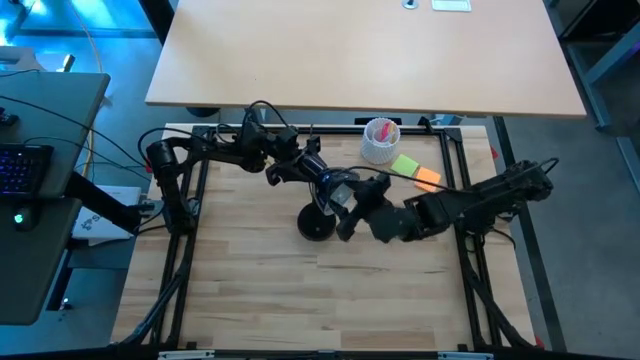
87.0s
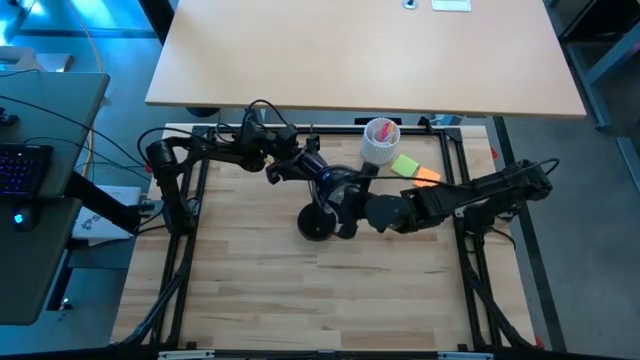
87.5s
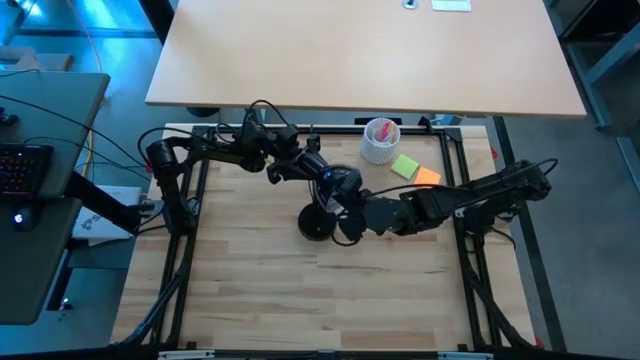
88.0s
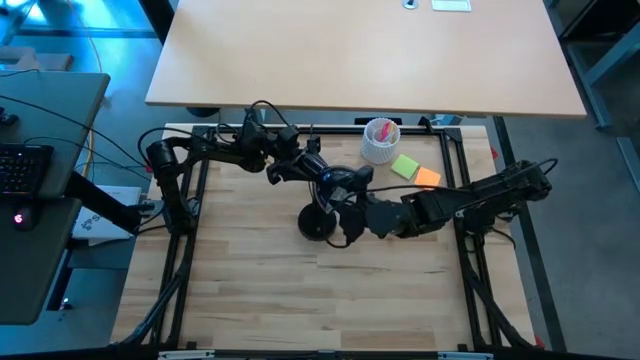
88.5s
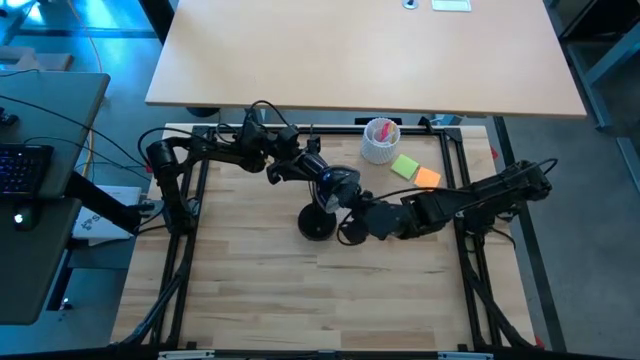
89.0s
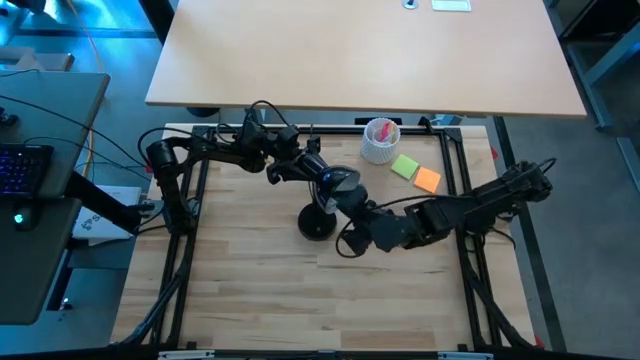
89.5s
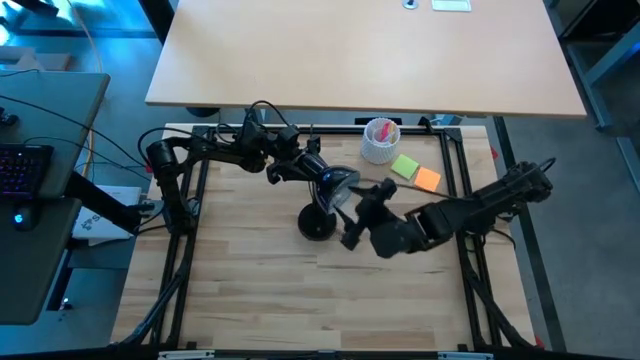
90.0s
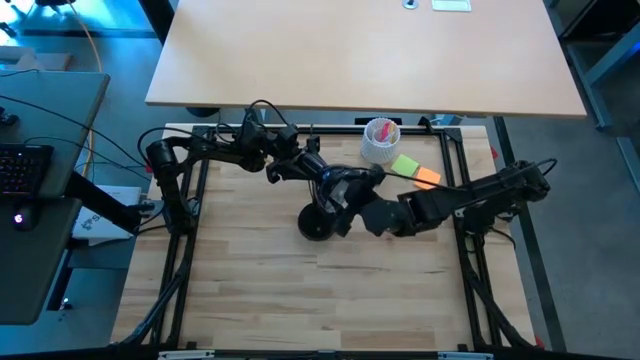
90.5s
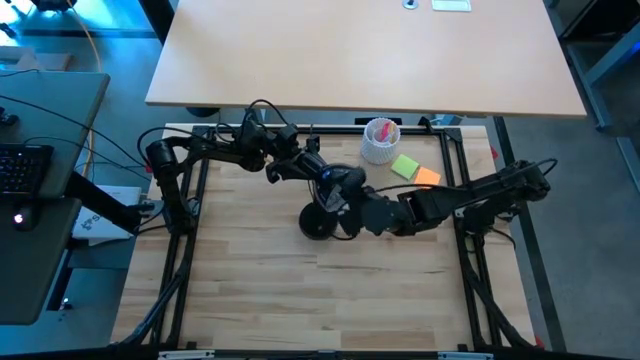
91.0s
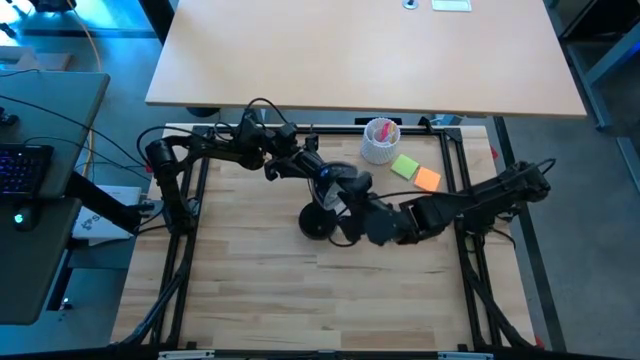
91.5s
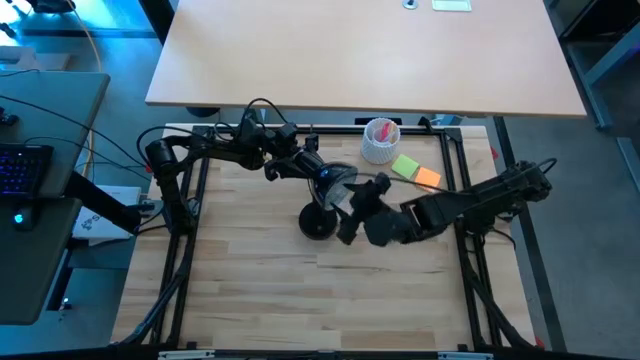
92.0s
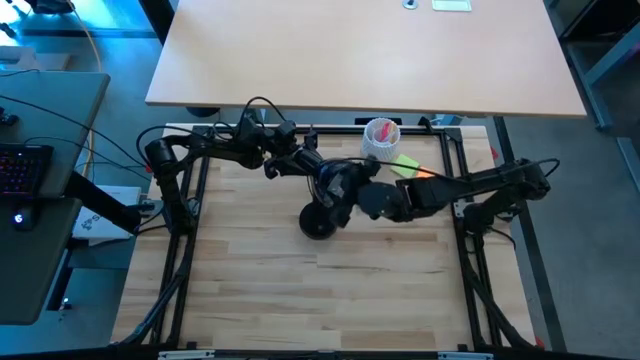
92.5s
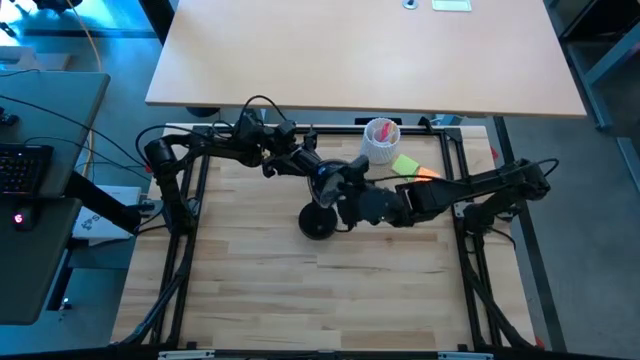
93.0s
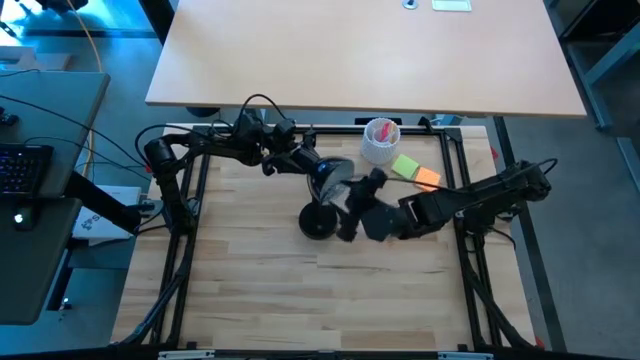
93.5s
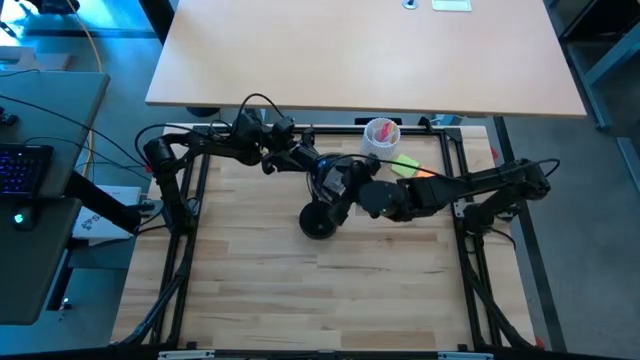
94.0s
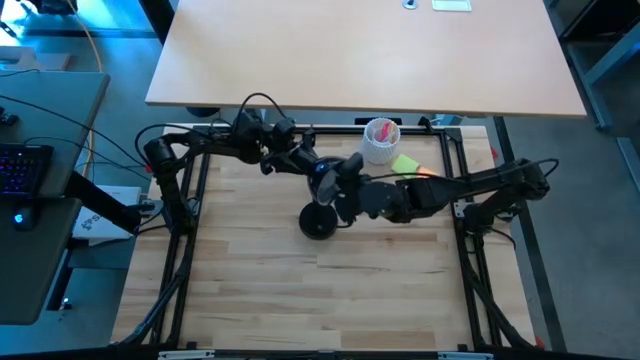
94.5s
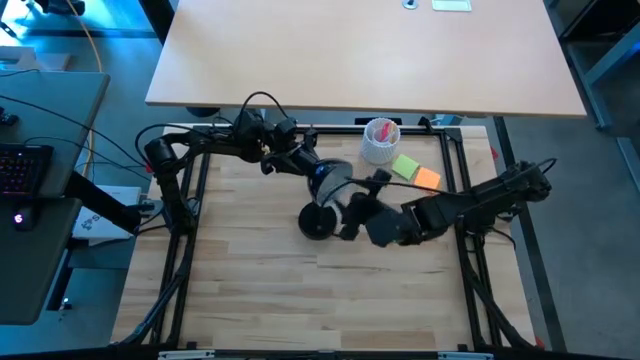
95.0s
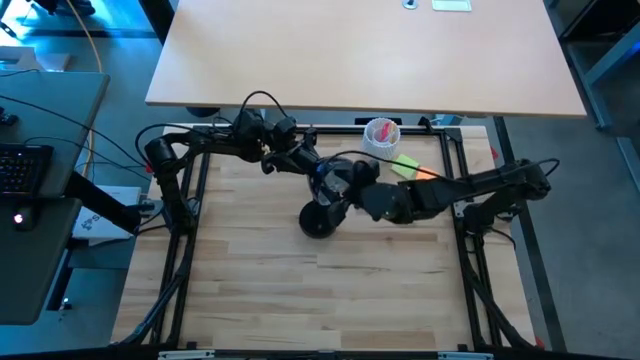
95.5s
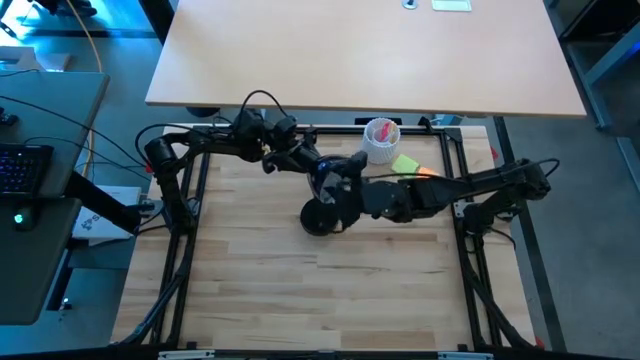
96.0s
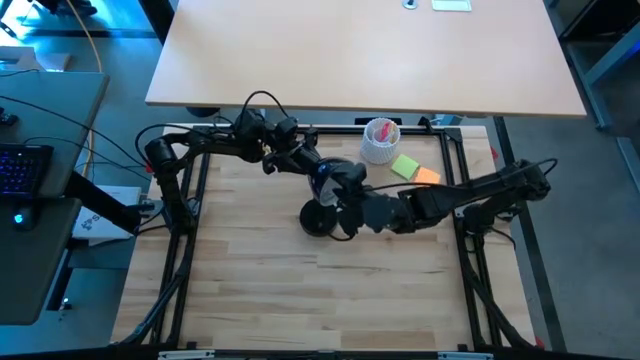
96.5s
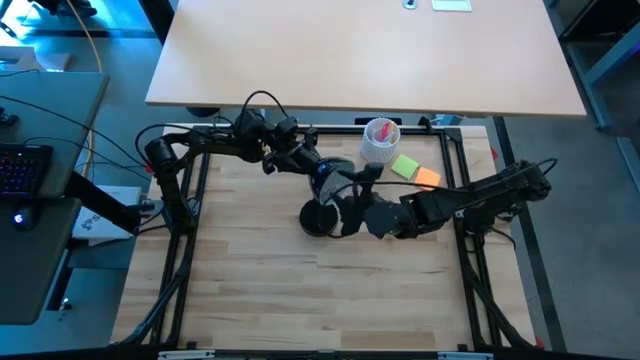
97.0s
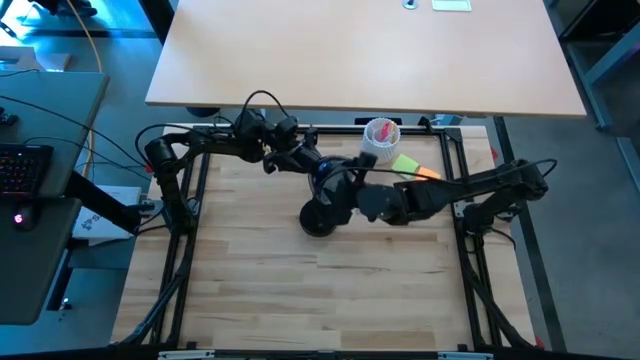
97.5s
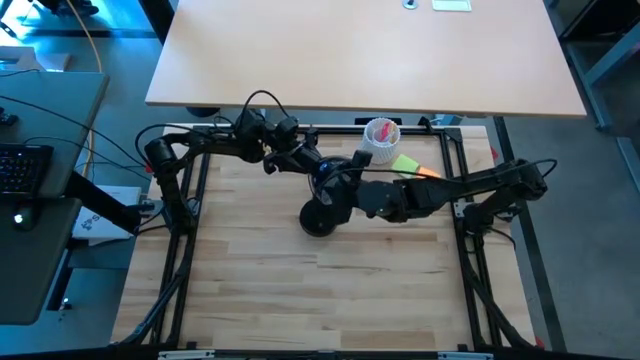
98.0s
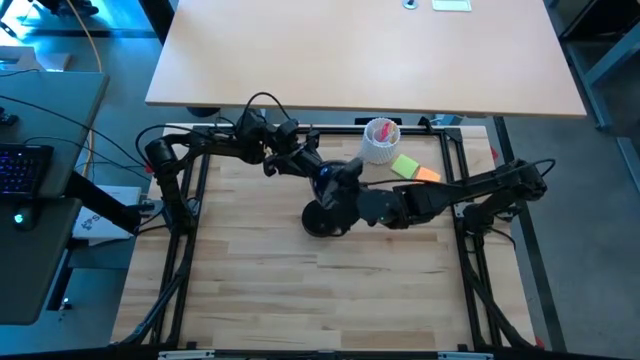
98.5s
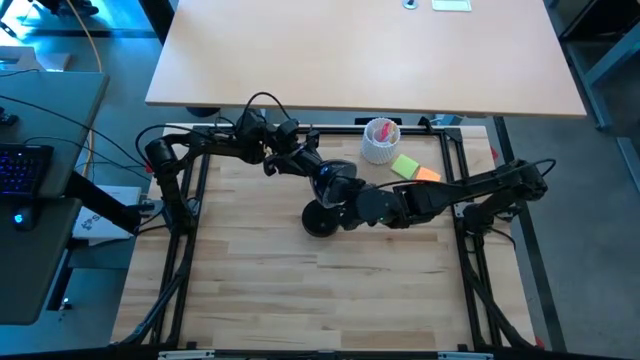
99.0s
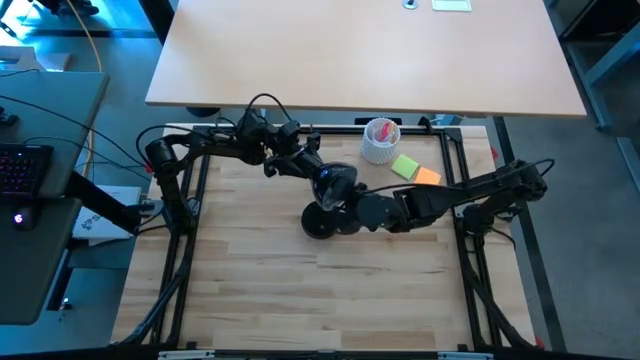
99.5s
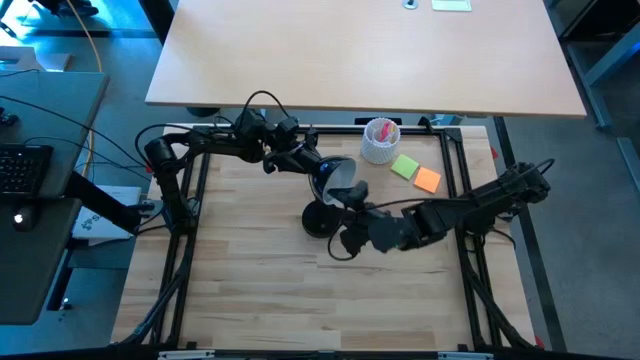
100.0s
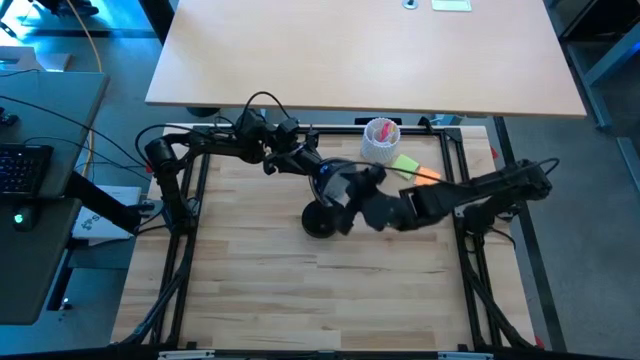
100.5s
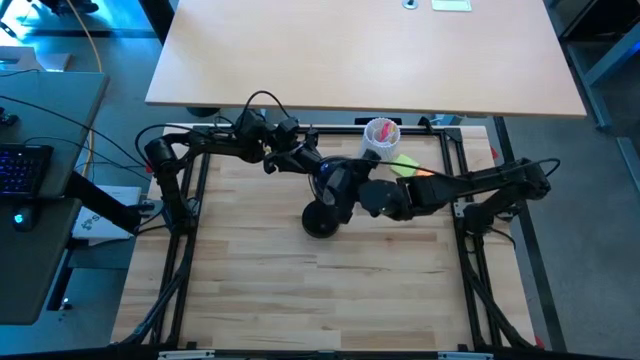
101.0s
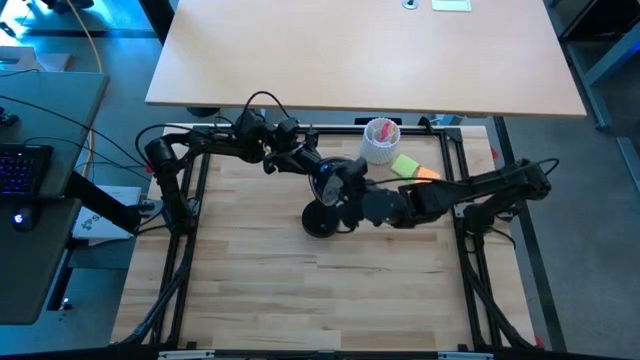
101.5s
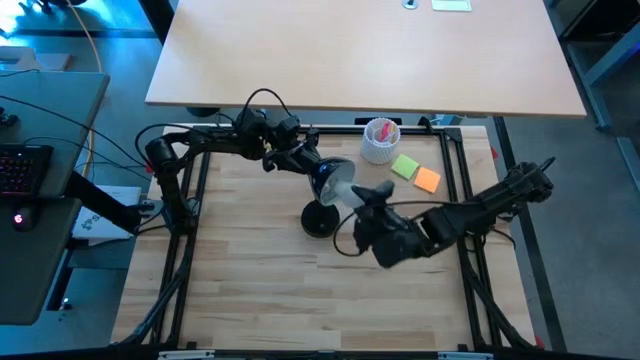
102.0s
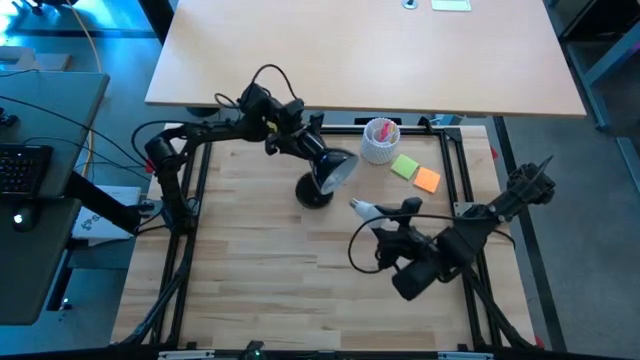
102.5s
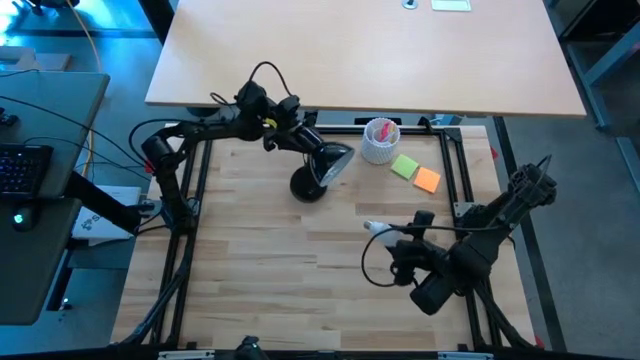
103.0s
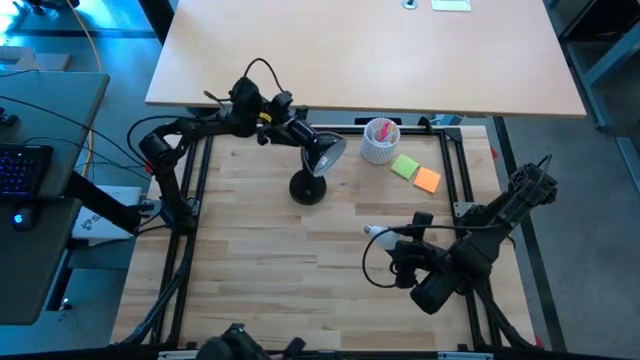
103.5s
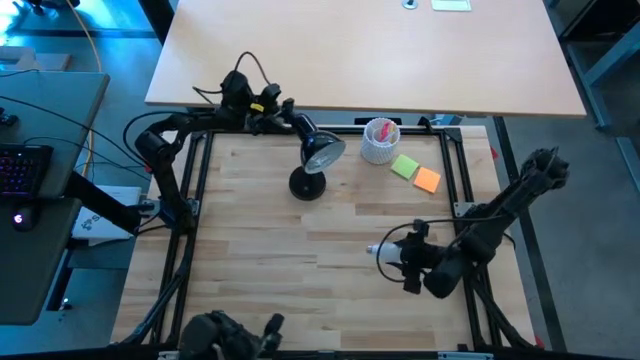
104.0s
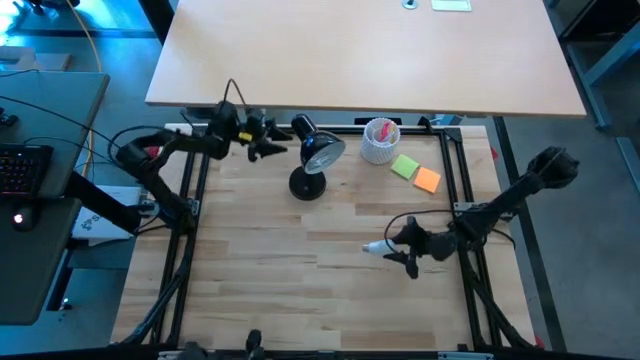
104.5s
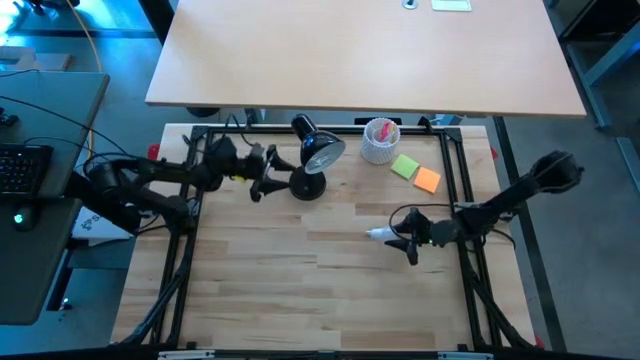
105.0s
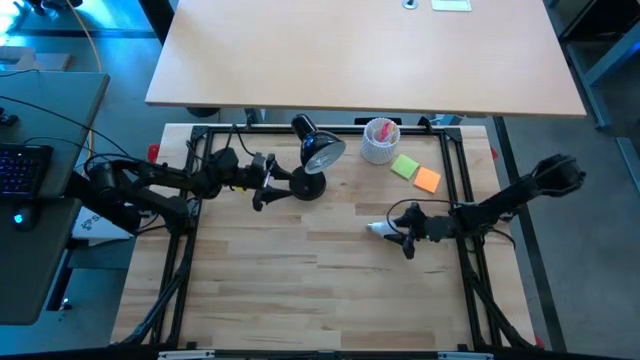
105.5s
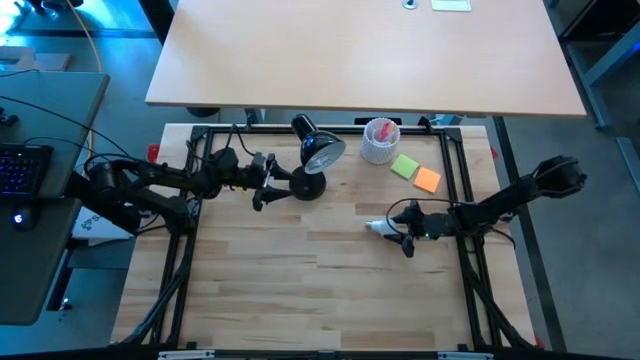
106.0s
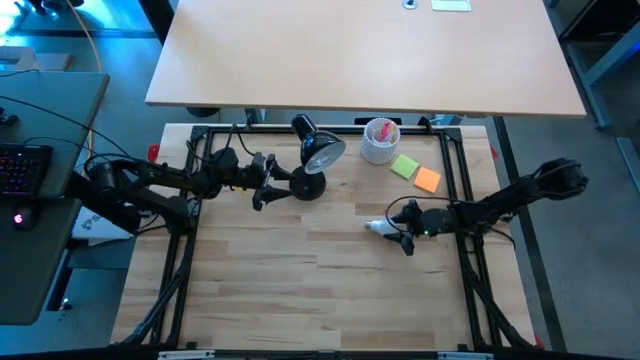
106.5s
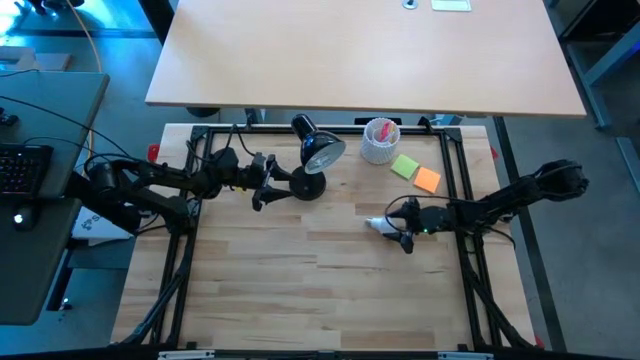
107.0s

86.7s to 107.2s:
Task: Screw lightbulb
Remove the lightbulb from the desk lamp
